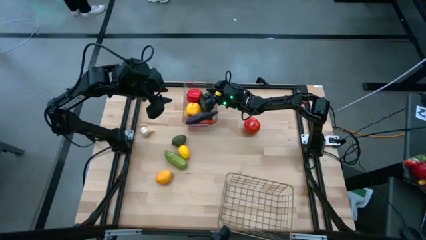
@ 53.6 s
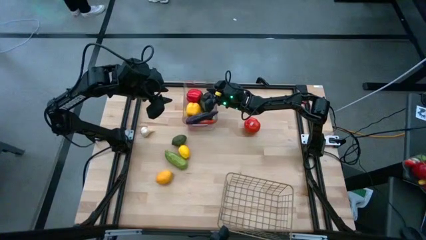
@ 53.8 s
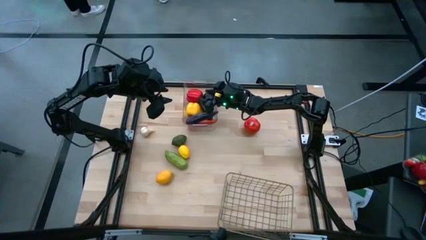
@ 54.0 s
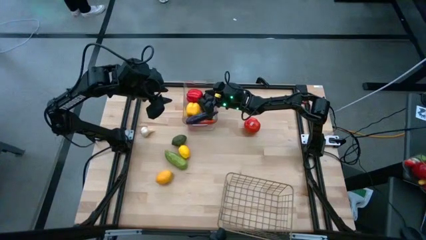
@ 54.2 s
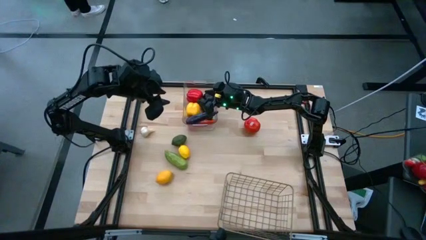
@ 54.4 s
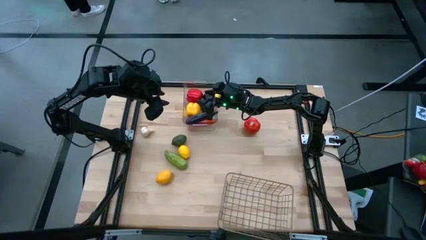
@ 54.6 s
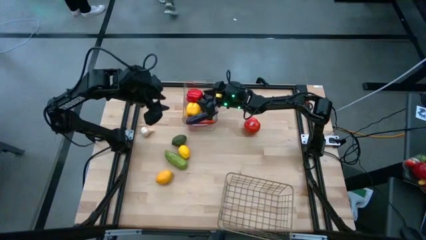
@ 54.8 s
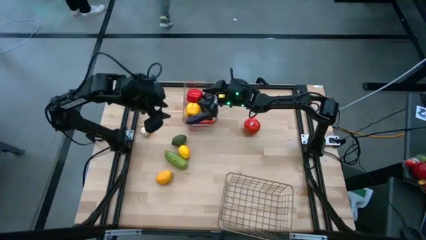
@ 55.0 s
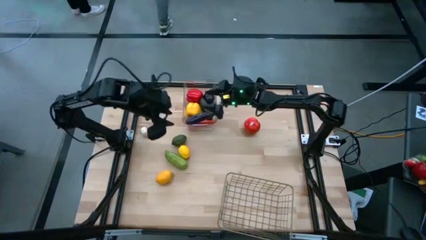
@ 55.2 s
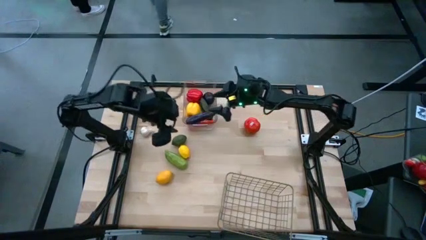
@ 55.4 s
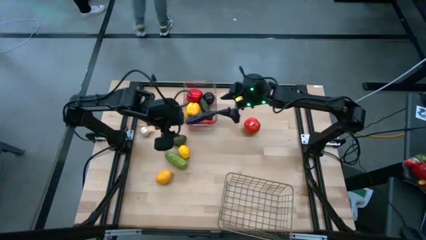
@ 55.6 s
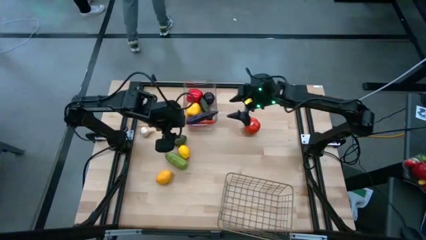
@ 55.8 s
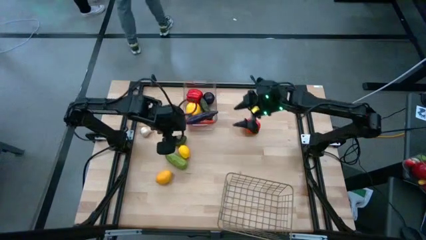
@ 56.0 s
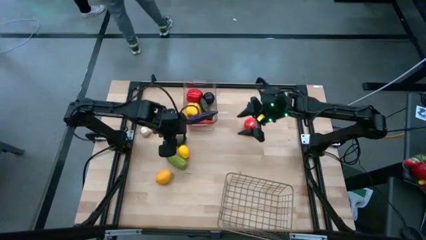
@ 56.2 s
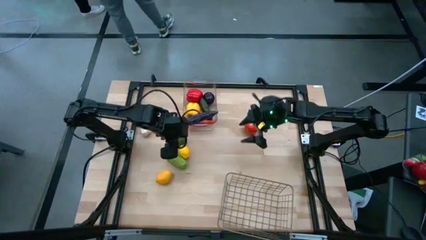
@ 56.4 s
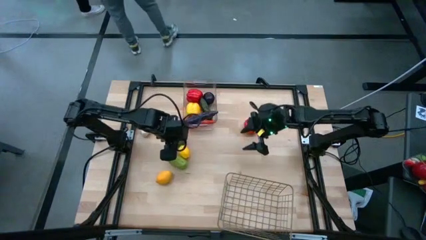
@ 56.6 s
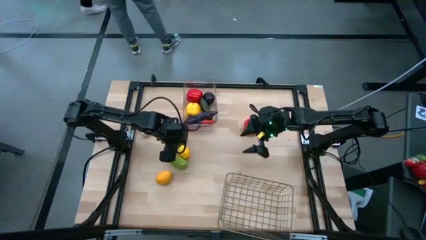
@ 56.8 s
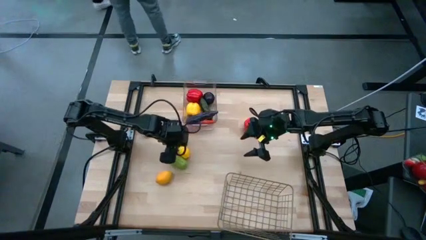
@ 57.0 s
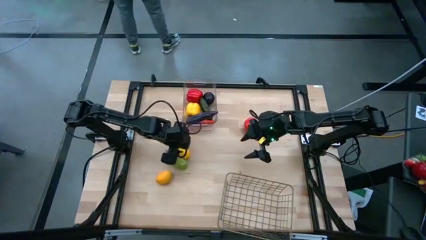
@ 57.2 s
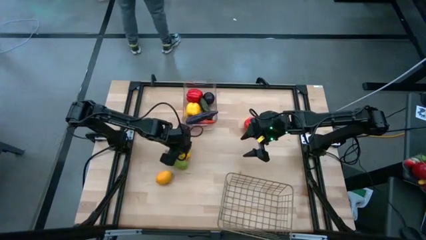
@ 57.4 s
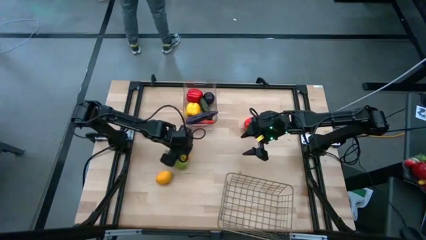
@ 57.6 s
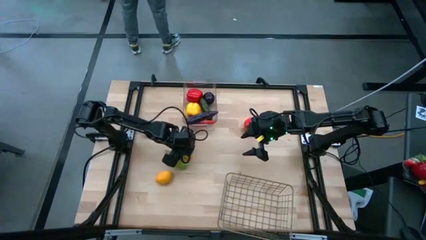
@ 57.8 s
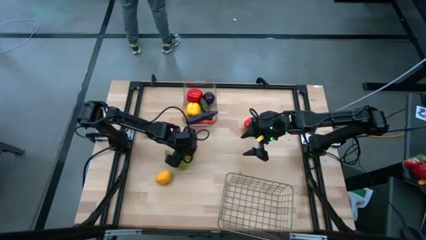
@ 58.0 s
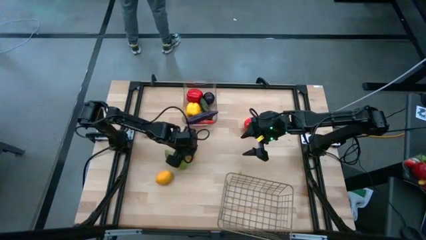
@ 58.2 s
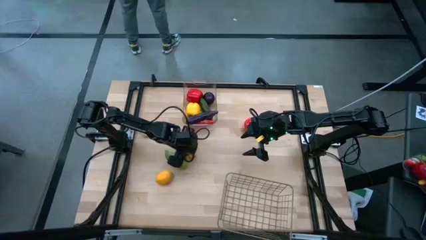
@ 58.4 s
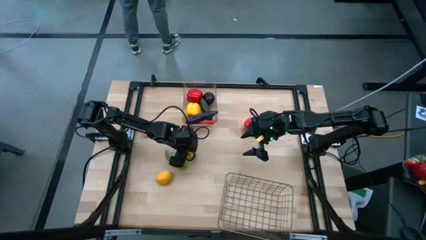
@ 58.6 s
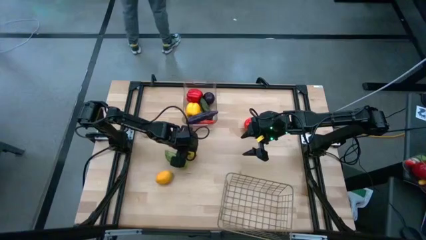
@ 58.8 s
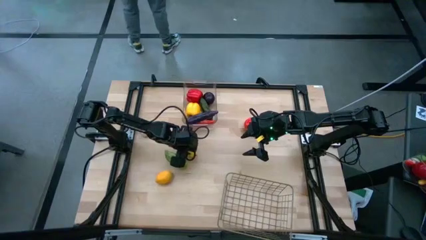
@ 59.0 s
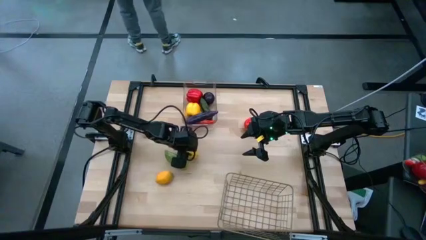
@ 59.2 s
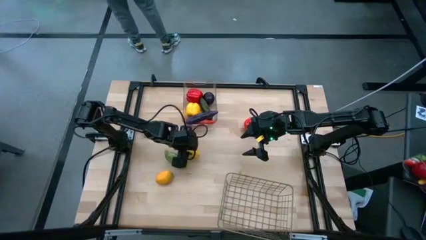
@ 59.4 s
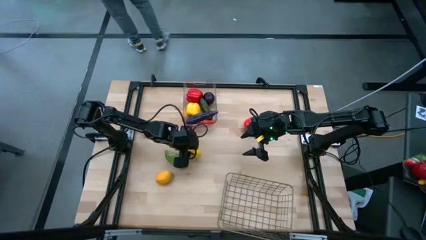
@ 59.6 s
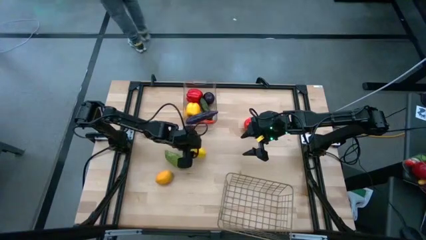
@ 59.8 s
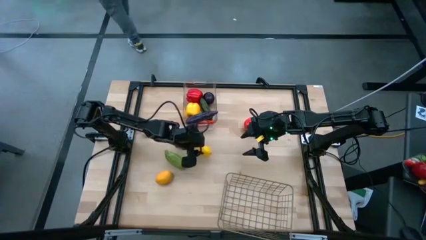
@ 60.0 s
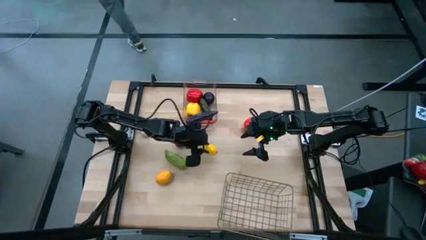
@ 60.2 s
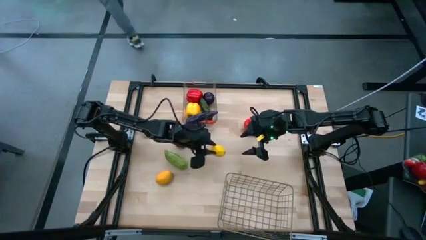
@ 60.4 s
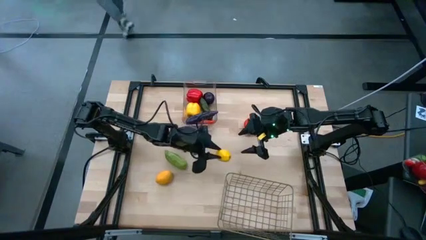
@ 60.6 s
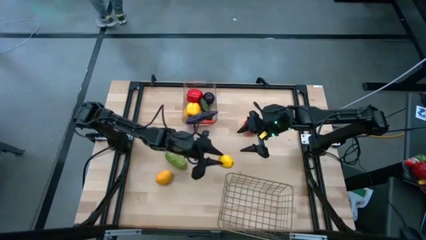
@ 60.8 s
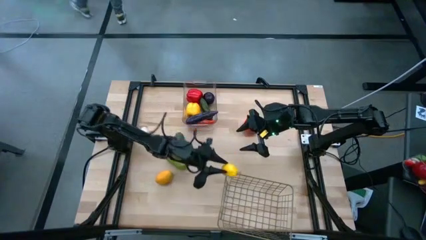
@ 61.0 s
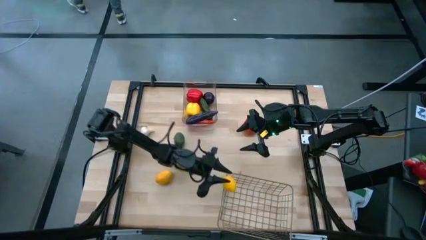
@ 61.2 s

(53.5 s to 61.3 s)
Task: Sort produce into baskets
Put the top yellow lemon into the gold wire basket

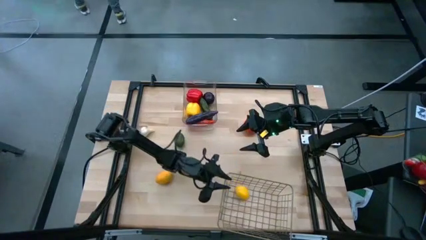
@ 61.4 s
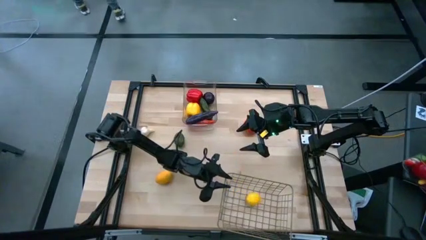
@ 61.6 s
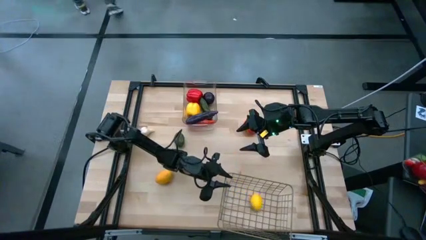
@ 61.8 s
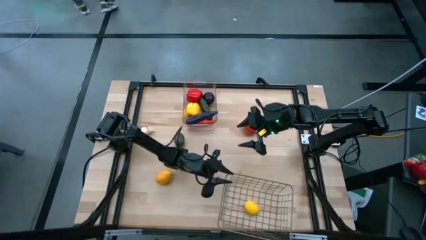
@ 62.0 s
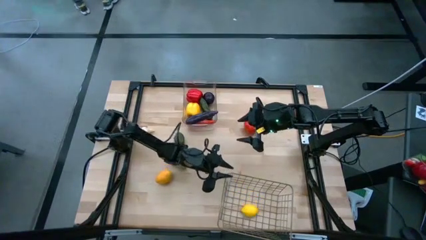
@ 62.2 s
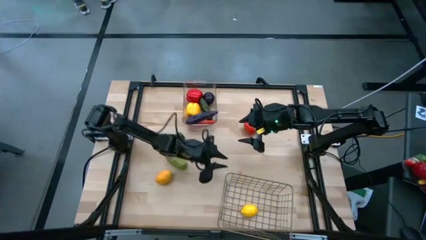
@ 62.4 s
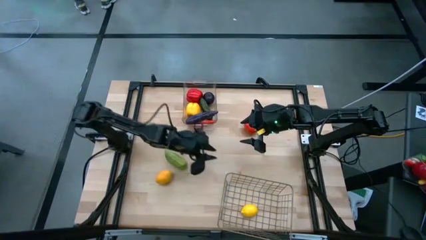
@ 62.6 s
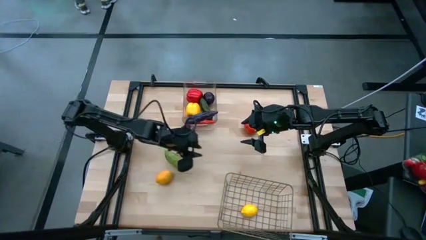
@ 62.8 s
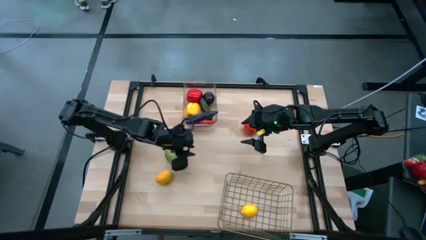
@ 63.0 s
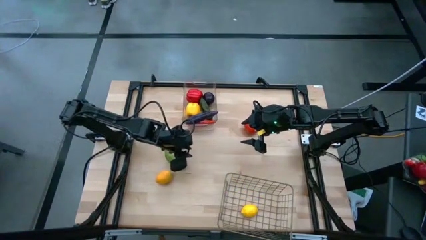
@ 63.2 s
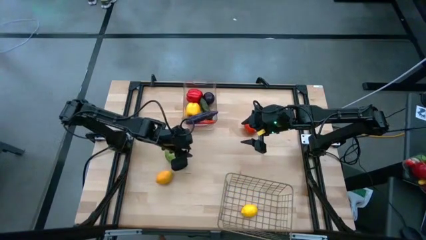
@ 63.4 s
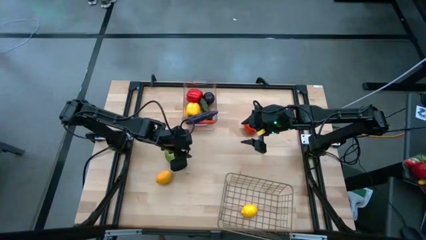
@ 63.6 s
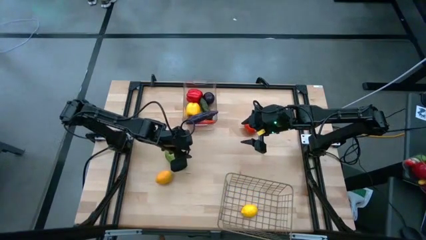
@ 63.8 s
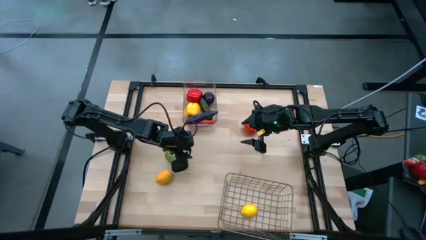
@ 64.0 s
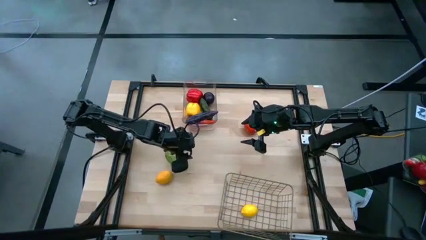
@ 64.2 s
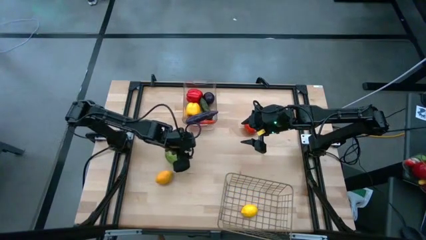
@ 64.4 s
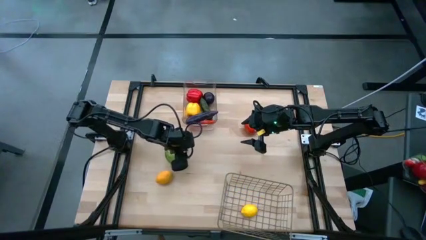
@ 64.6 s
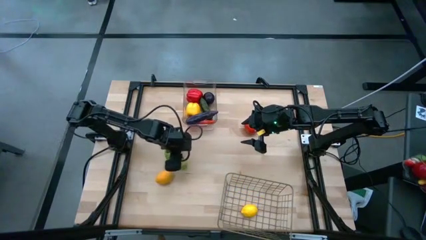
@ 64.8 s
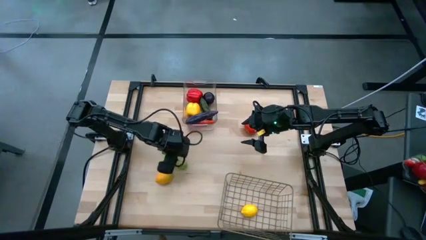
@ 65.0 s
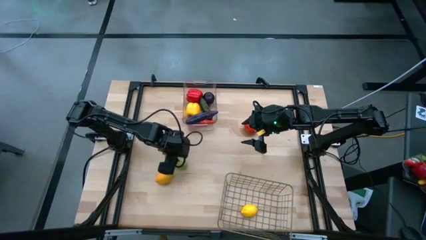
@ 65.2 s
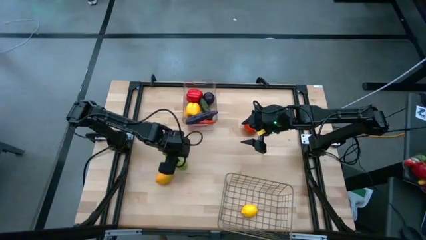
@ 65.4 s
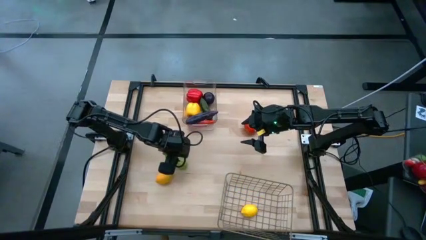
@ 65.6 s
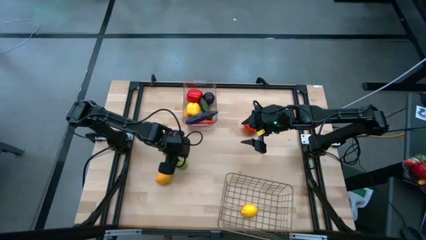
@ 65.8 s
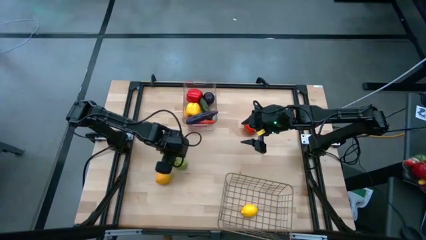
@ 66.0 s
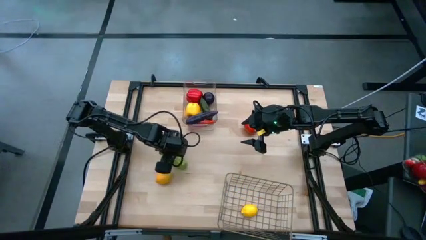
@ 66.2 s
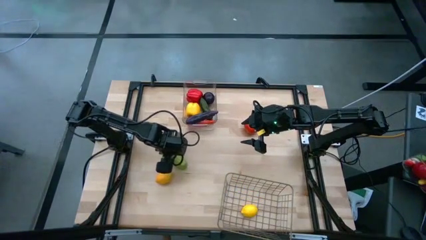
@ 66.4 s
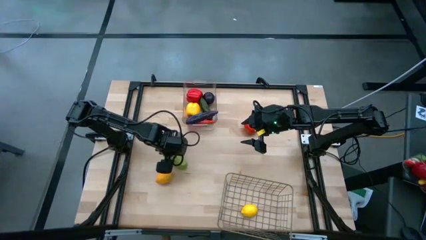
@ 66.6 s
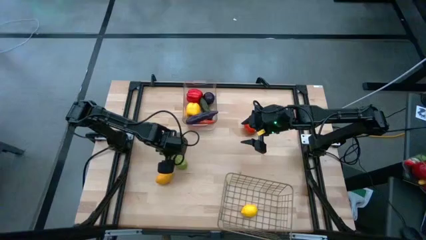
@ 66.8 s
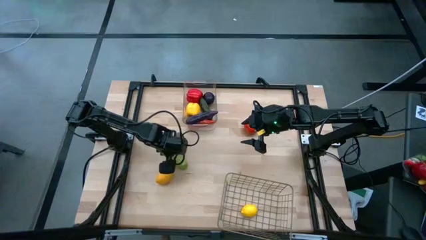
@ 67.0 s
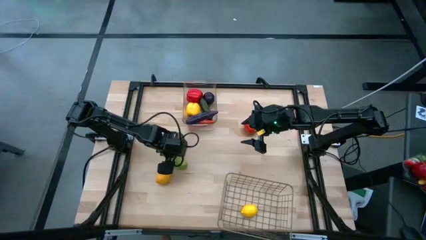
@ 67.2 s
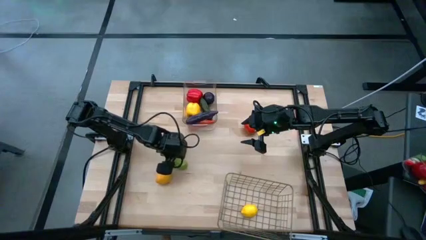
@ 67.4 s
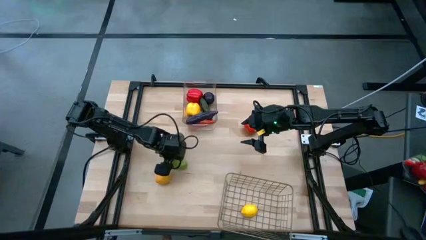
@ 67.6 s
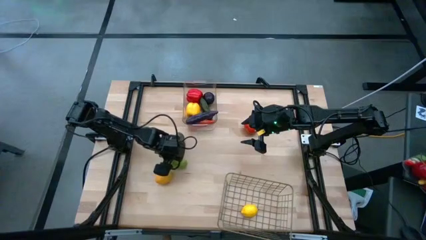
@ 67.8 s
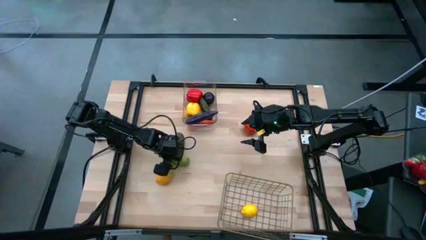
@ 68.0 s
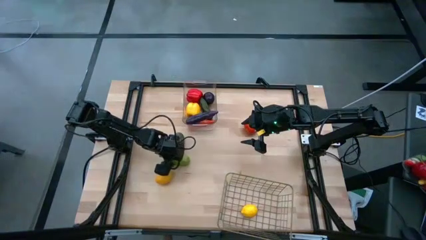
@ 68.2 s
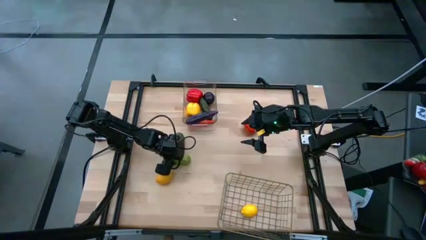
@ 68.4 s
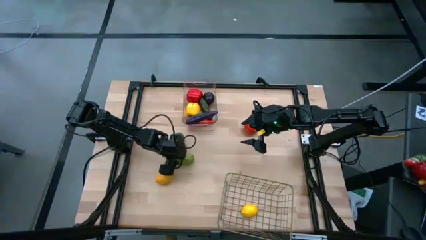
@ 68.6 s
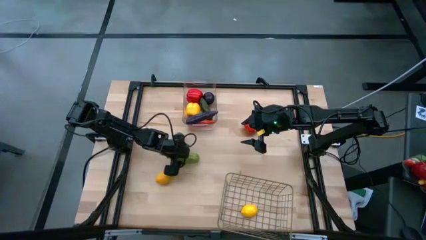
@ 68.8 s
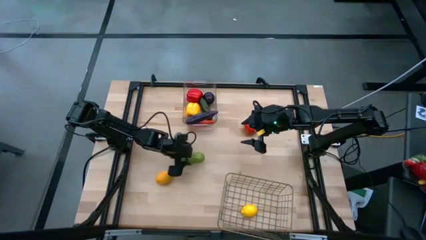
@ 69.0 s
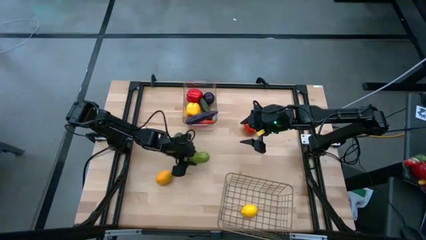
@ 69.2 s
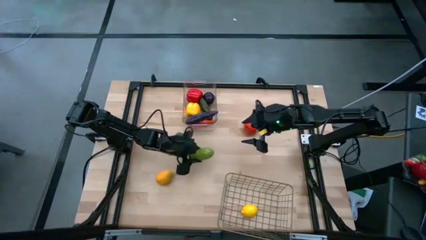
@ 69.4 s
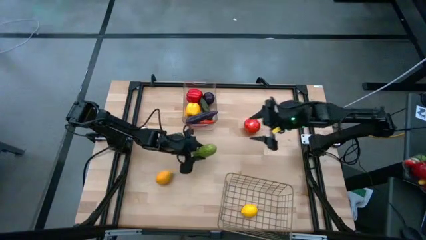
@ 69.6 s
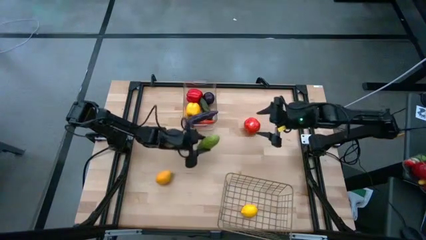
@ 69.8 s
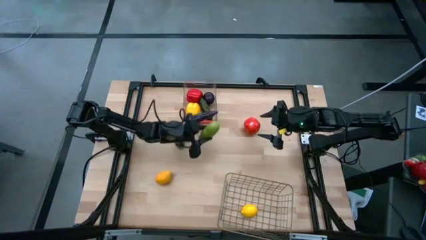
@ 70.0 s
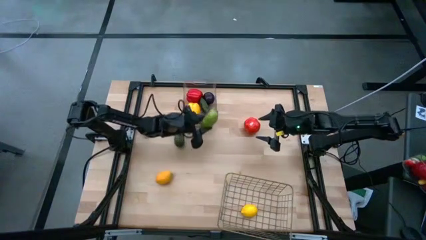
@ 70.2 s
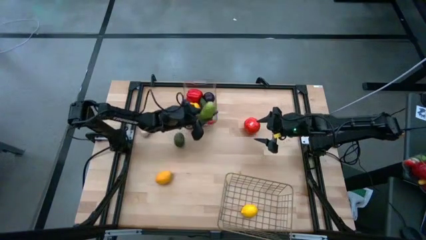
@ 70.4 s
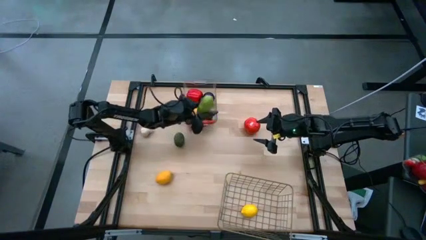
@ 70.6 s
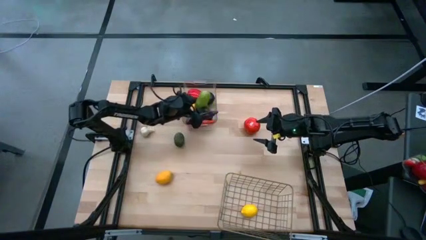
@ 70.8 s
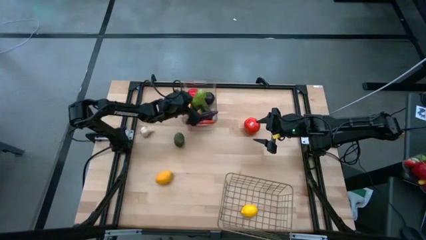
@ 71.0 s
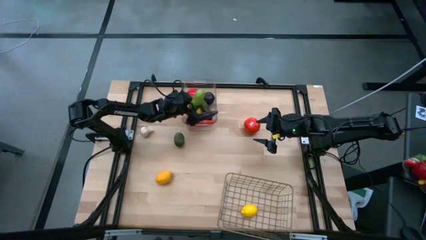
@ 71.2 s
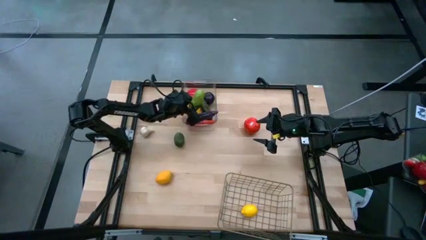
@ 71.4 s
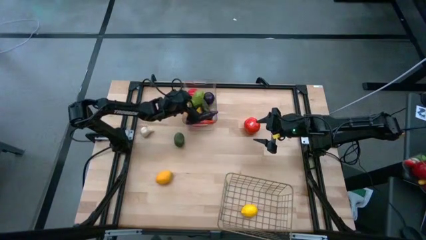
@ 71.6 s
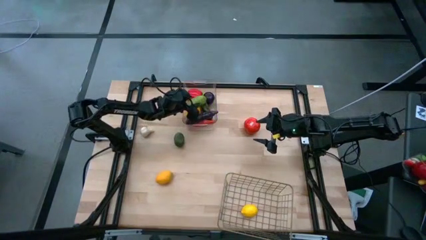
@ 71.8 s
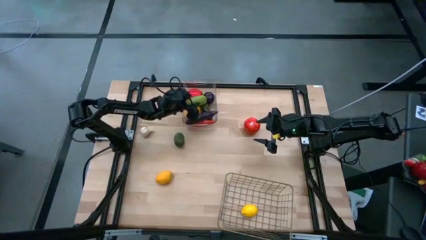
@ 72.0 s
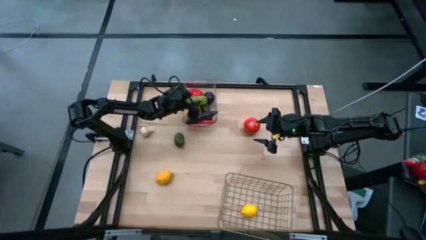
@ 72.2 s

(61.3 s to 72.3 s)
Put the green cucumber into the transparent bin
